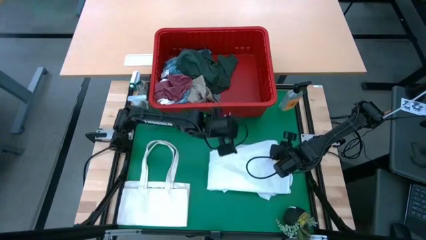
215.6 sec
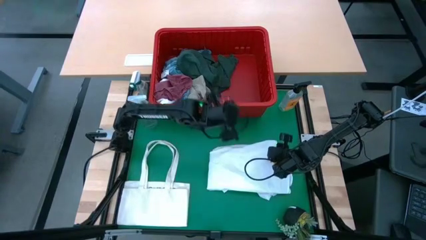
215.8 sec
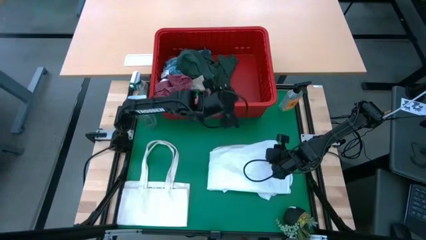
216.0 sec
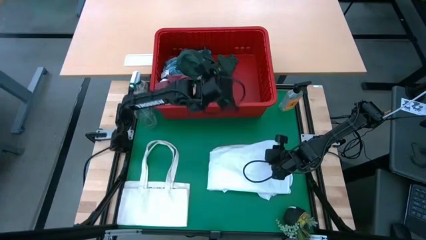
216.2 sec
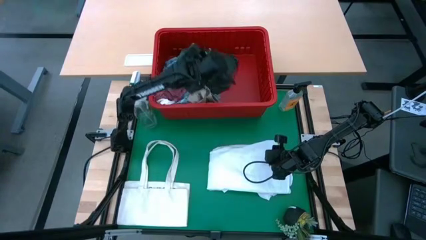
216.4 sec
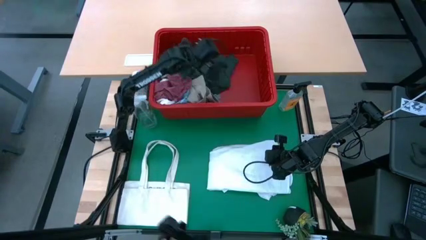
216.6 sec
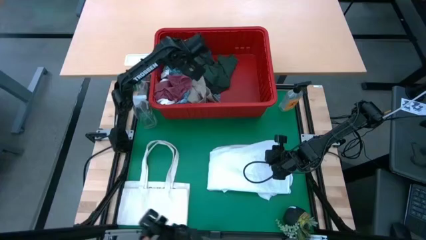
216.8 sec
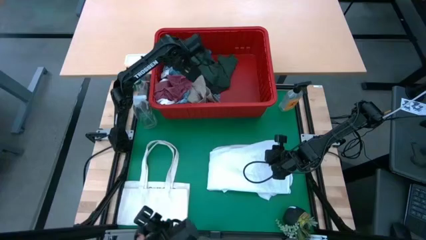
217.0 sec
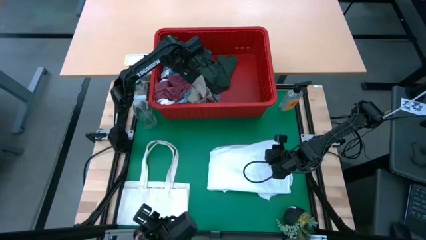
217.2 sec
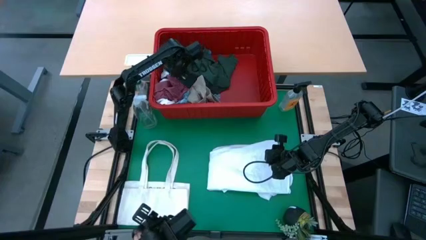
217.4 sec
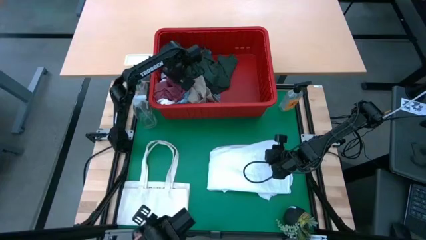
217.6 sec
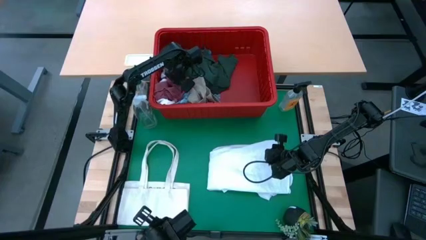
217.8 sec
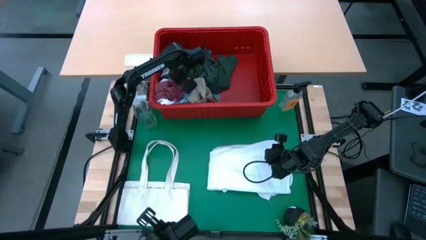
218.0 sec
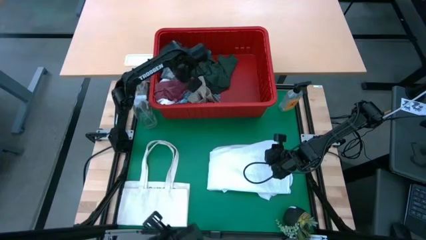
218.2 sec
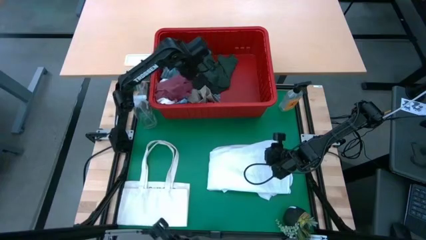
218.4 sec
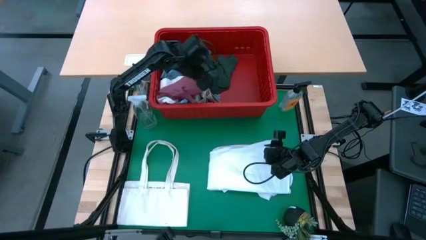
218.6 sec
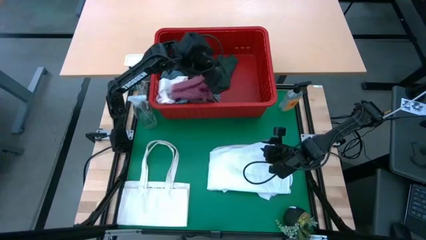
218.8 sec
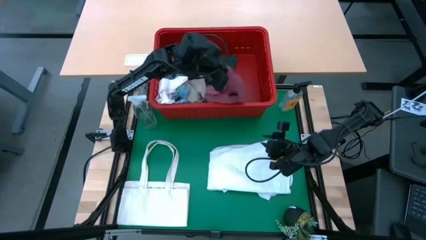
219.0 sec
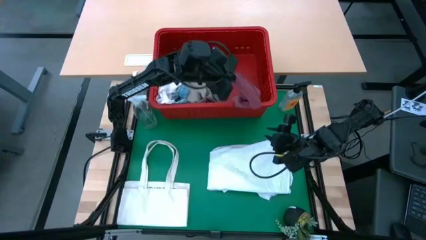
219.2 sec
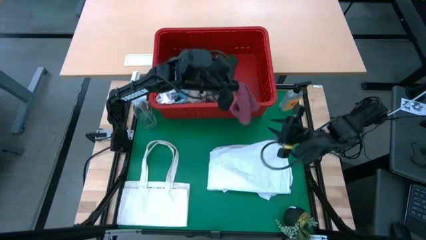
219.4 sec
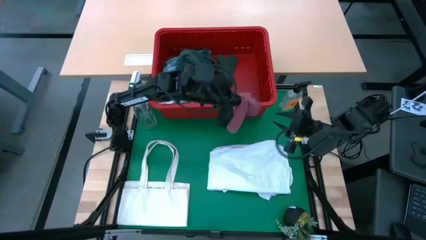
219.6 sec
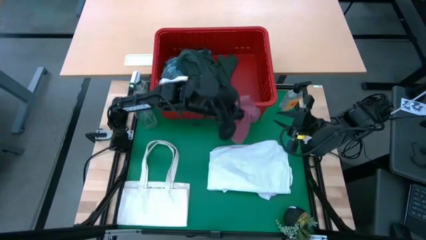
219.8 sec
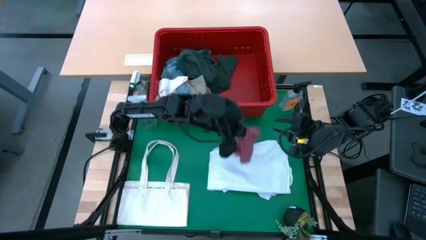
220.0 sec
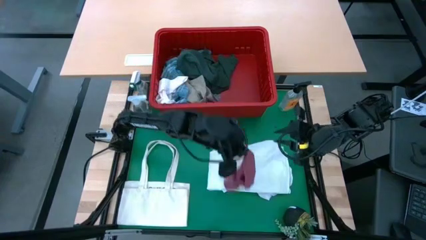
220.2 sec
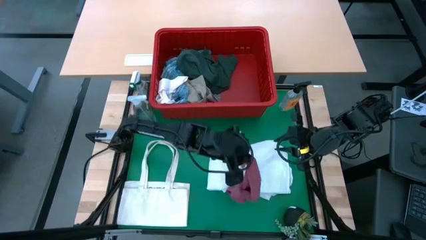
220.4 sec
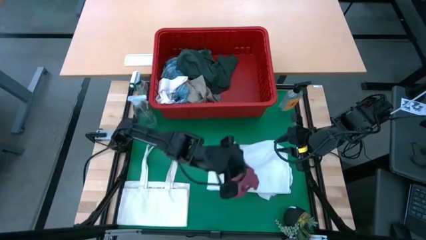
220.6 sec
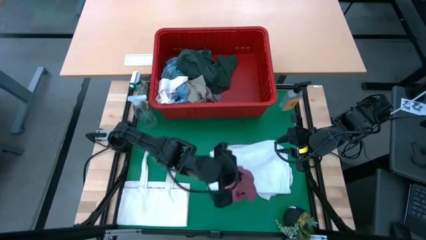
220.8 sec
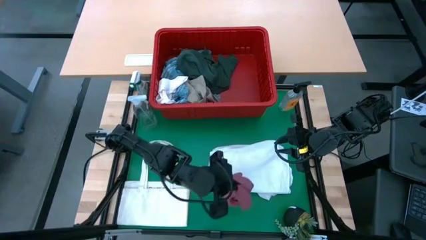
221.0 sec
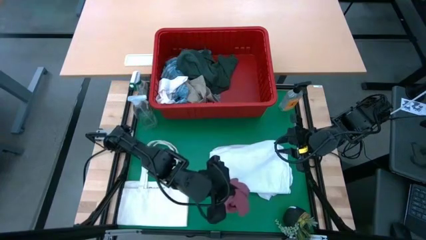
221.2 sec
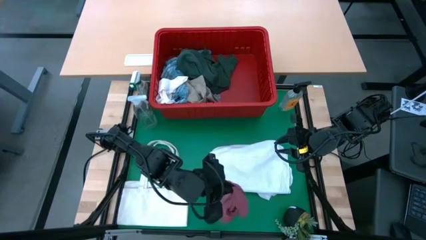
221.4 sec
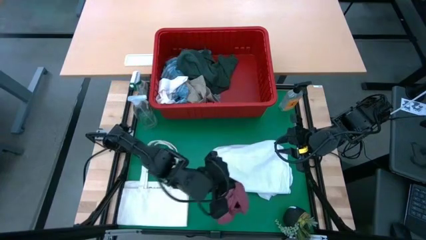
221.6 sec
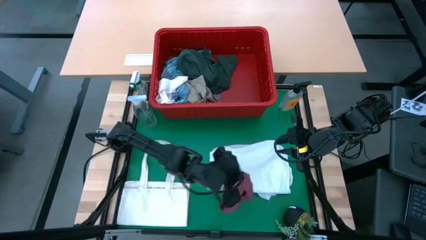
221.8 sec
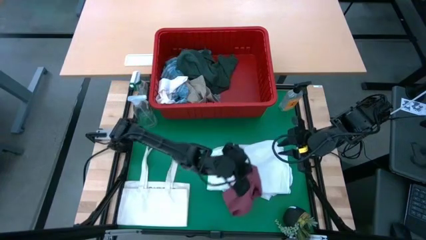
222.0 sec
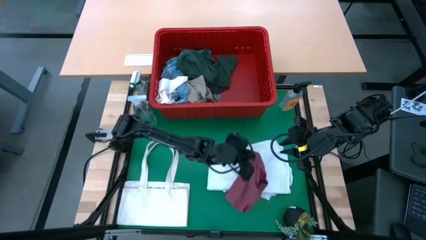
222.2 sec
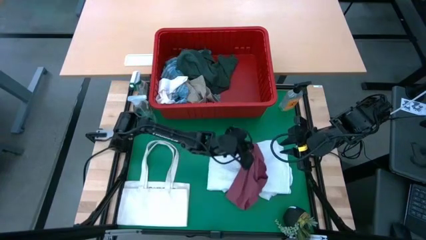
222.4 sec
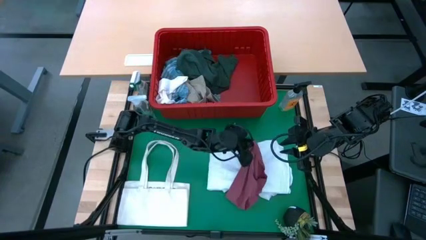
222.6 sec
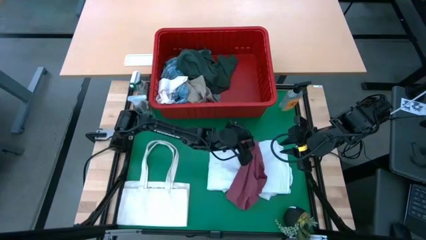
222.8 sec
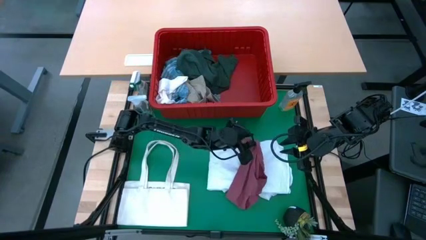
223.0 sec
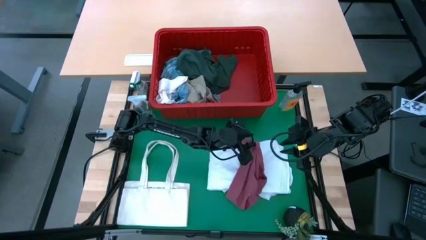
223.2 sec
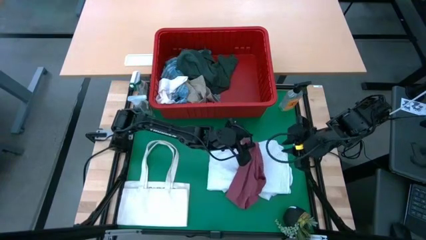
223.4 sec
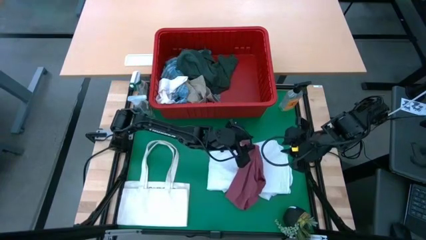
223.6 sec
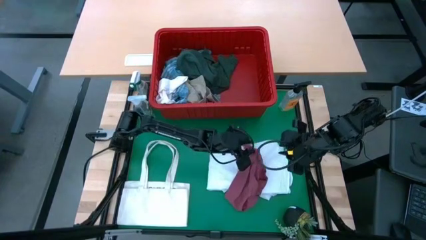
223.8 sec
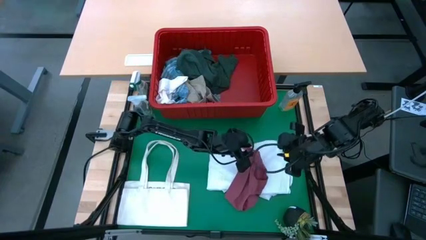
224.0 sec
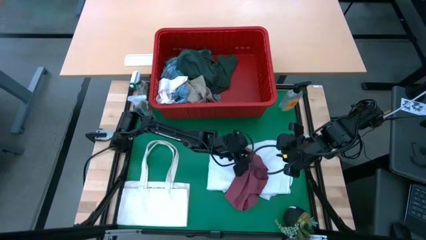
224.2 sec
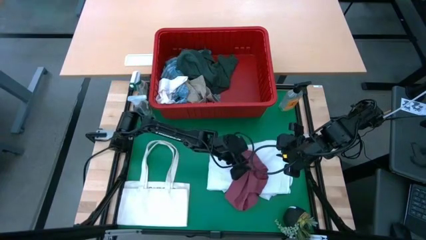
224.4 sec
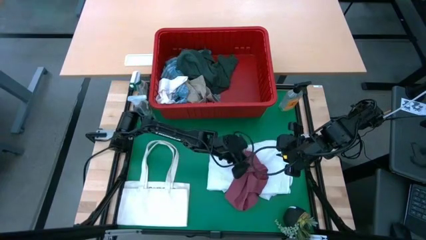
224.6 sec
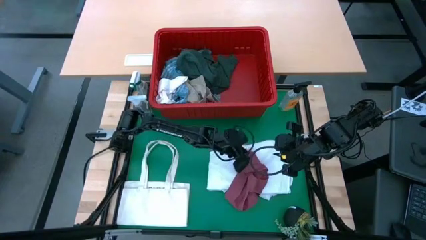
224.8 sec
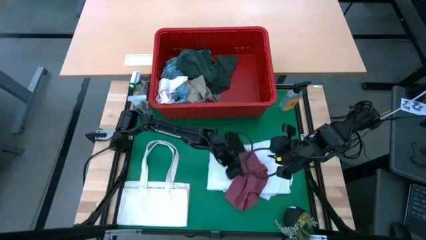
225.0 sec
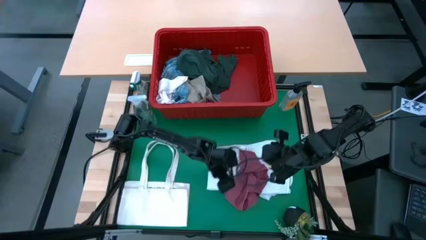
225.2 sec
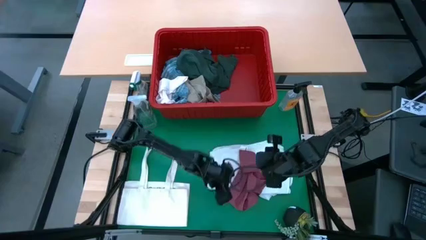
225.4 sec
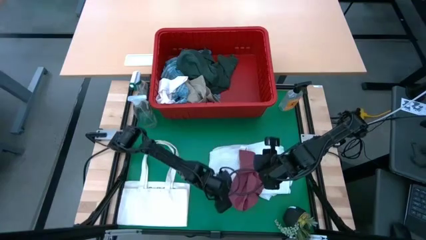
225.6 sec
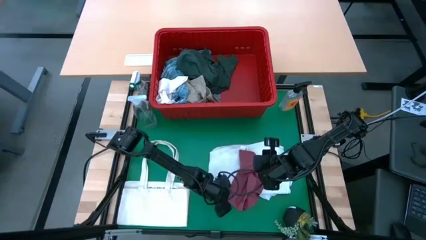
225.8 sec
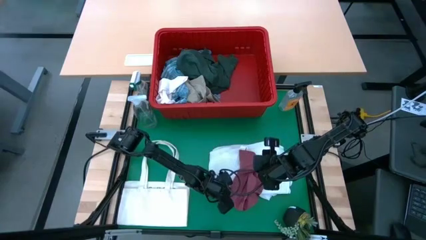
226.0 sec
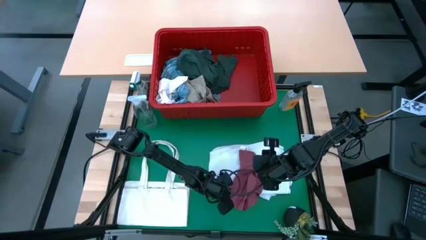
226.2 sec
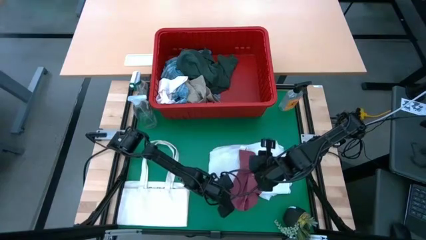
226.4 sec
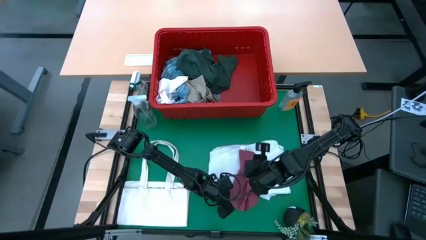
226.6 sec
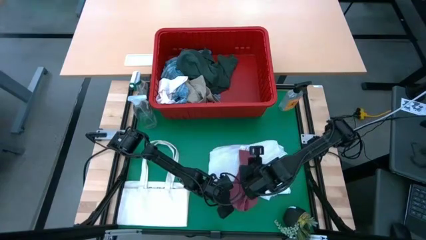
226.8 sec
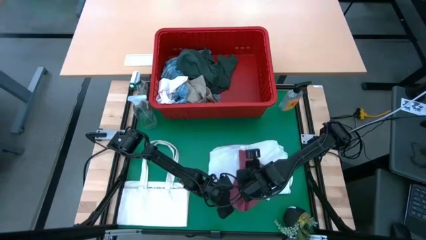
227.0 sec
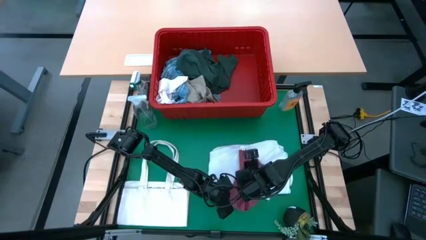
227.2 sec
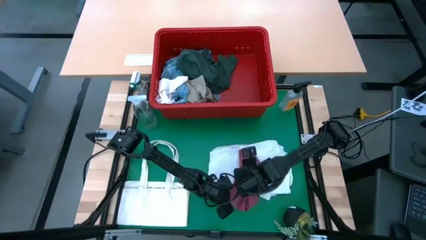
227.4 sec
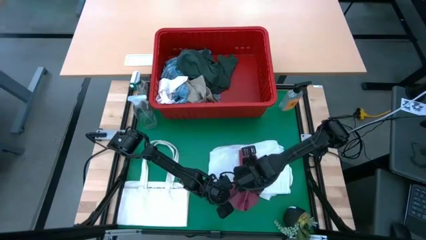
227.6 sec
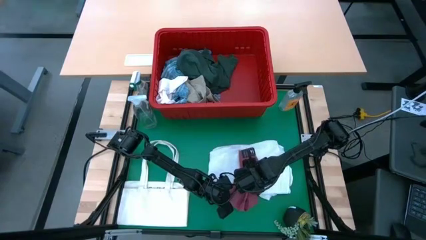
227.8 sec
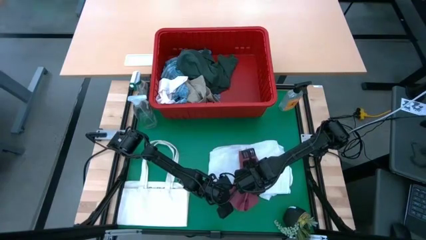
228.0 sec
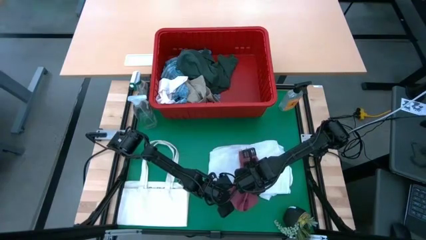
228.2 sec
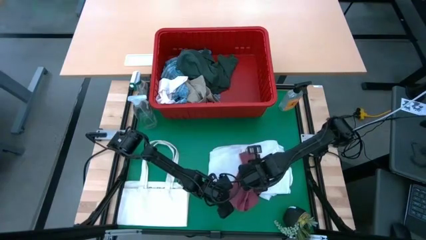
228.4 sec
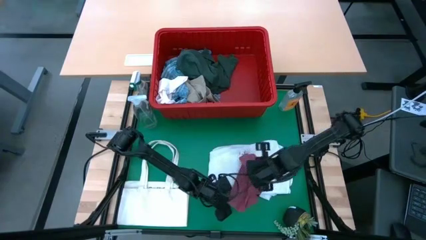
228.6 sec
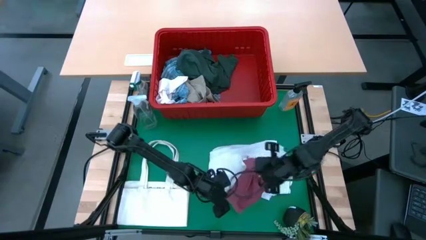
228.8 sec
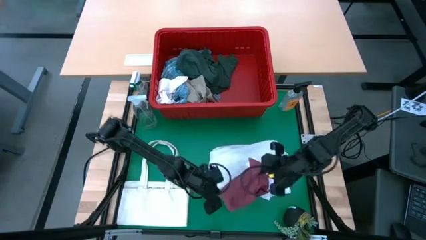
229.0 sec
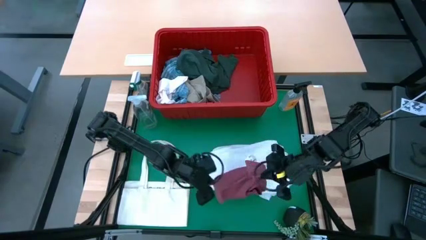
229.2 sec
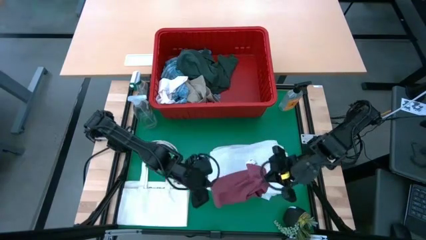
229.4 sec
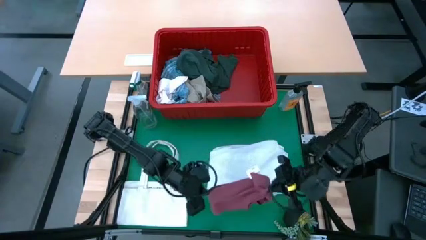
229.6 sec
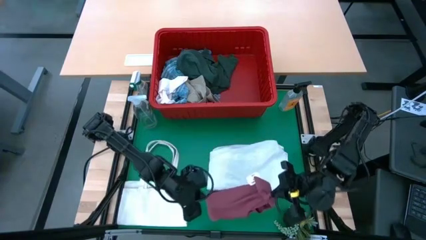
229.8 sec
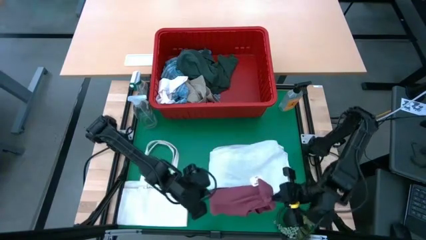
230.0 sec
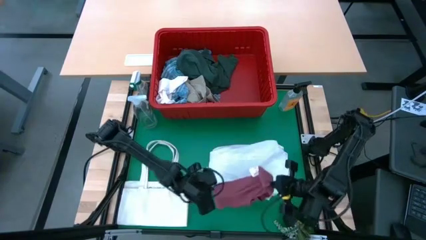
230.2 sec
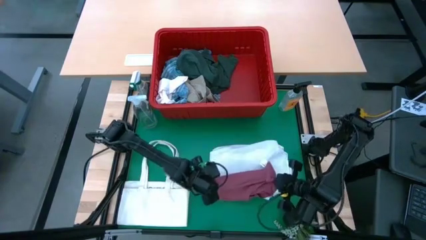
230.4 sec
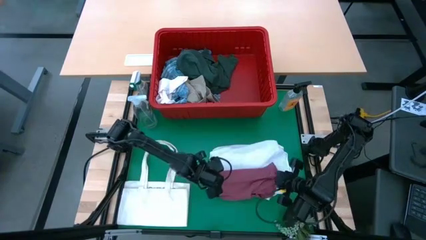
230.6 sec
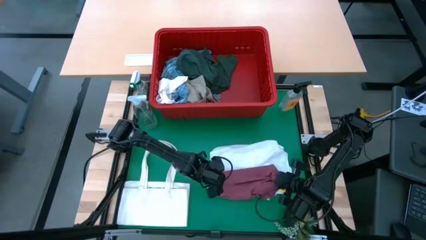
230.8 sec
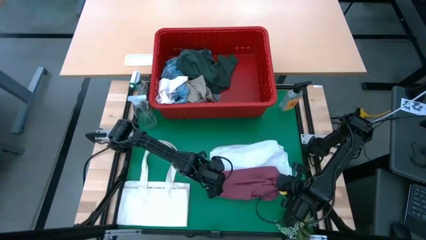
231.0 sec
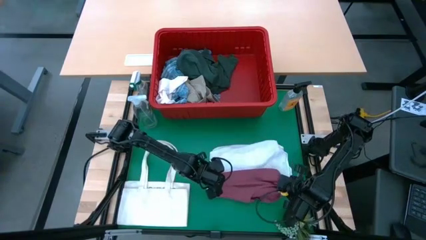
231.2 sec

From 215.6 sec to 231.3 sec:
Task: Fold Laundry from Bin
Fold the pink underwear
